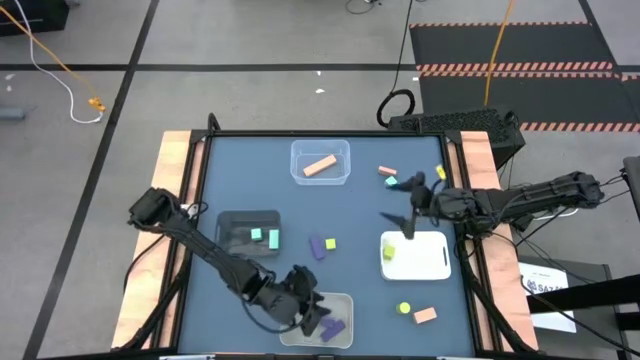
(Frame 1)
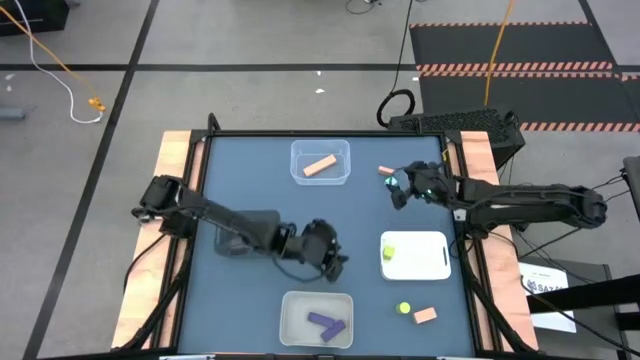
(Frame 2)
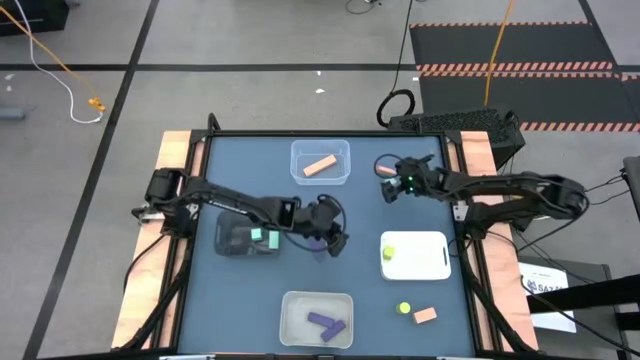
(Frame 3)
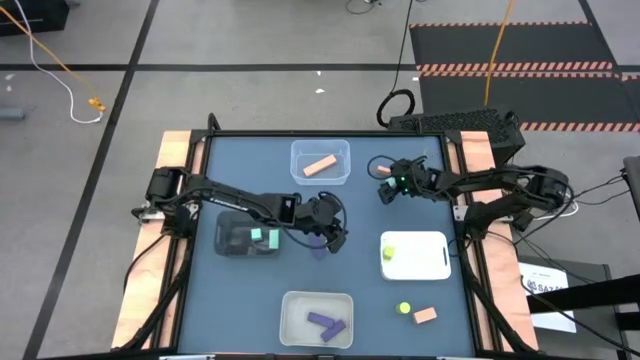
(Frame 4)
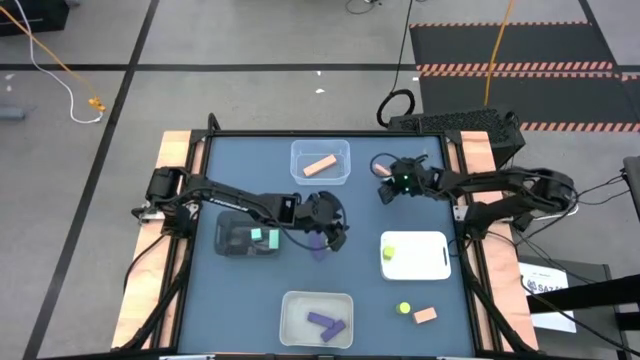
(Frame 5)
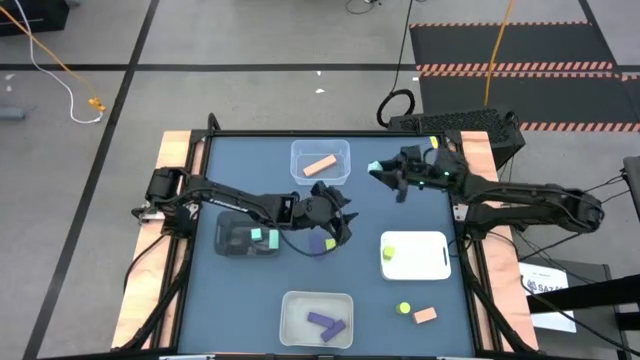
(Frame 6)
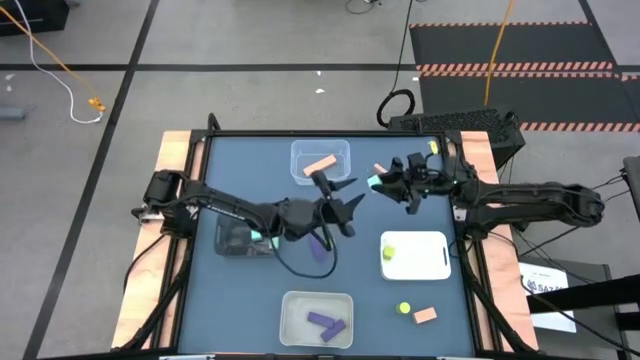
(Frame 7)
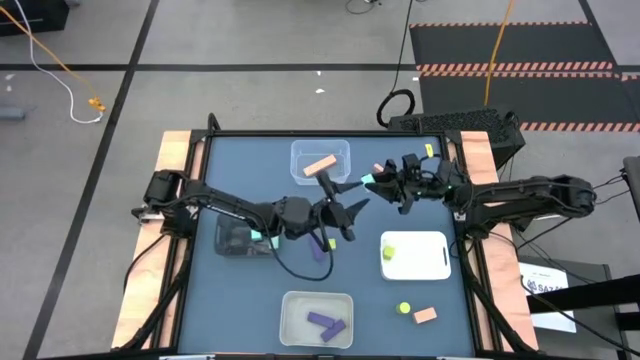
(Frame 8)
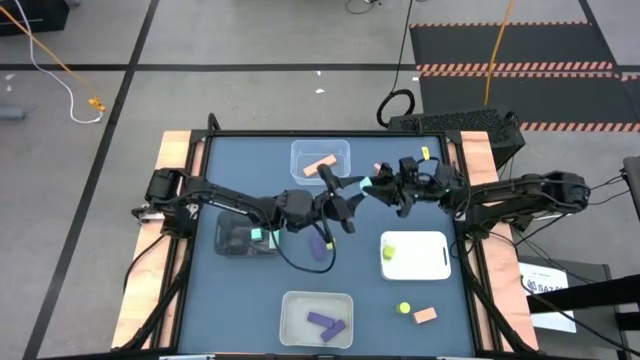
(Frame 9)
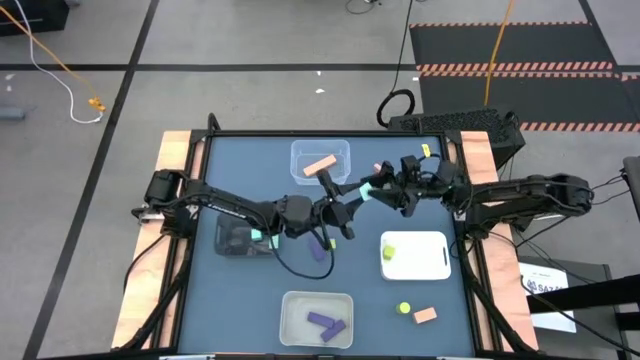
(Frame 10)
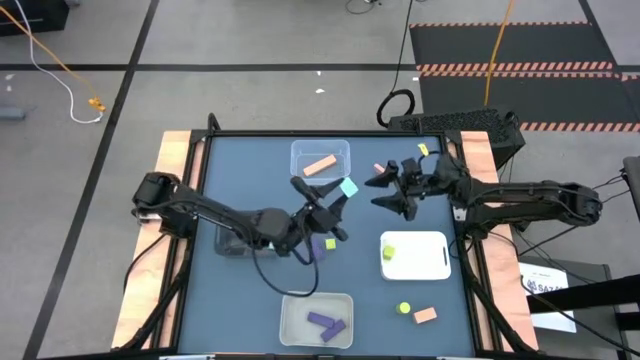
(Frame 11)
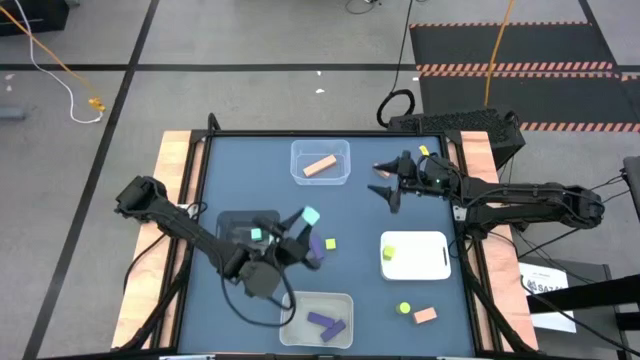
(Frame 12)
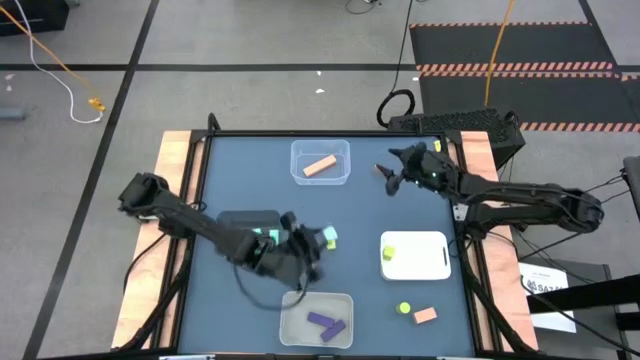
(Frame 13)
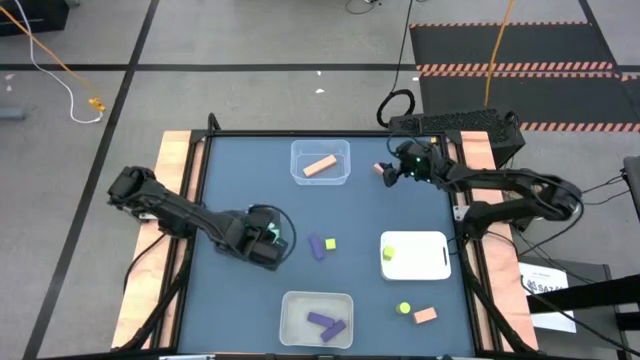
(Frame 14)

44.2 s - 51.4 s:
Task: Sort & place blocks by color
Put the blue block into the black bin

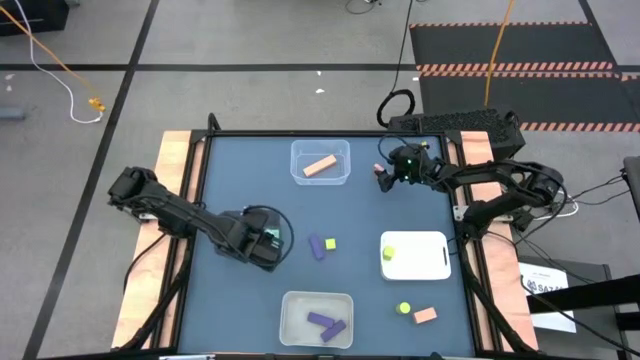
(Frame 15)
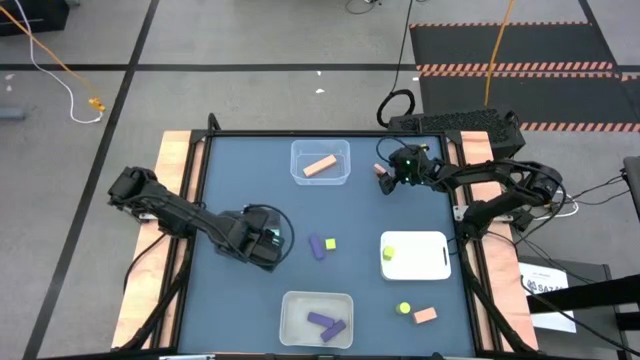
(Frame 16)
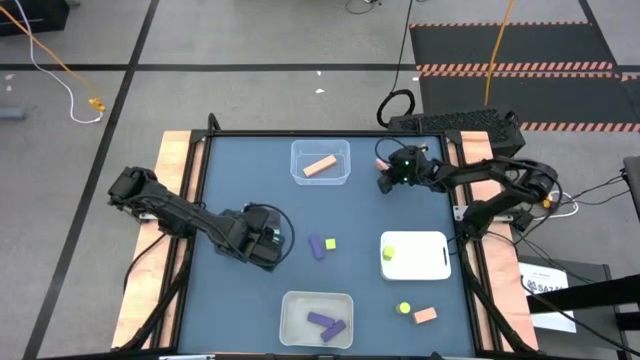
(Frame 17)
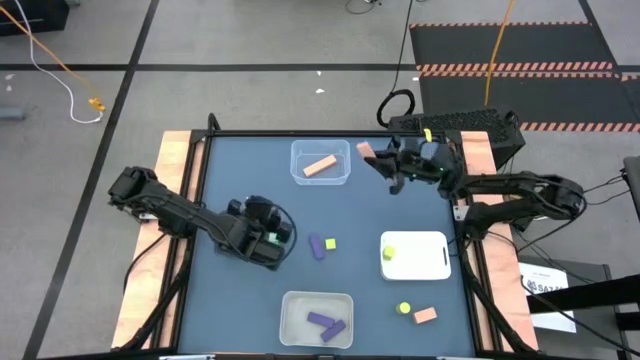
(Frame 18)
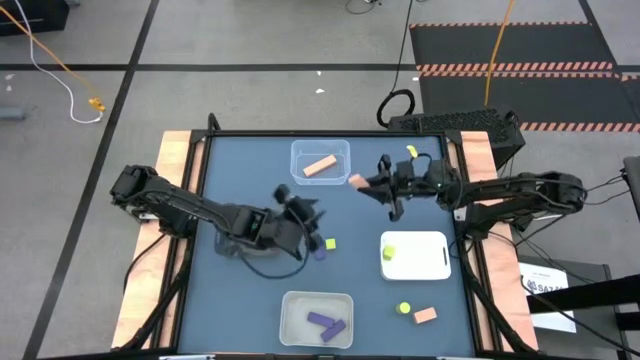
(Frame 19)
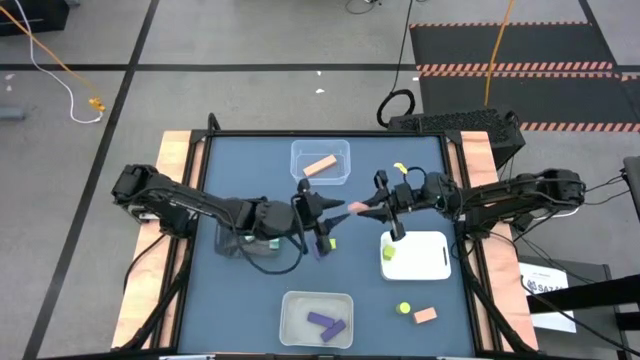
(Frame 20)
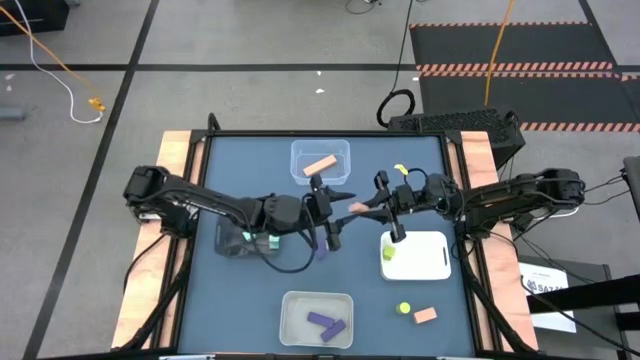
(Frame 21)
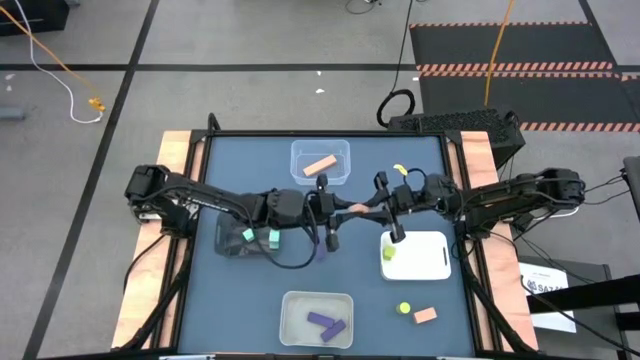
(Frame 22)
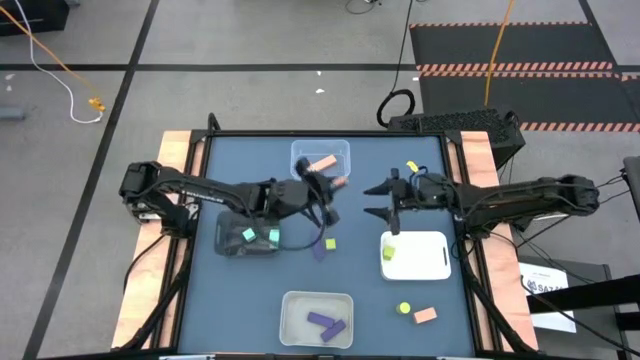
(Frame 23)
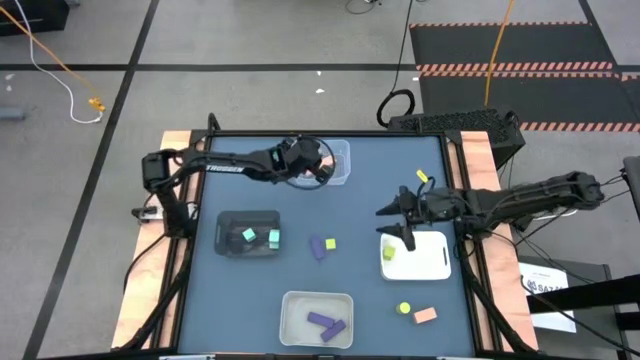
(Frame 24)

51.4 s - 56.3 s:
Put the top orange block into the transparent bin

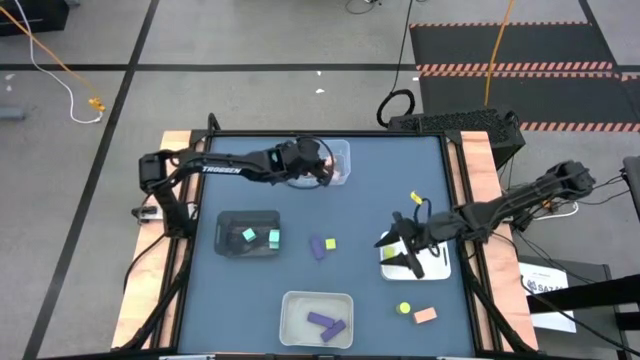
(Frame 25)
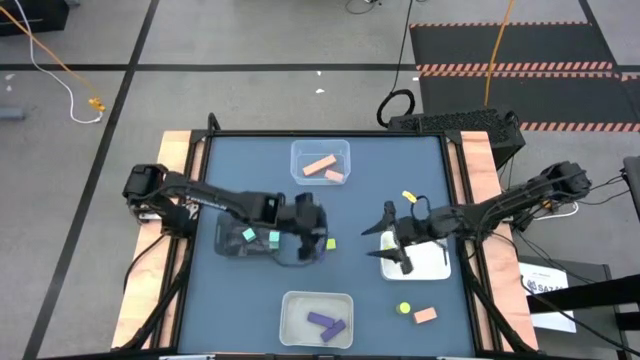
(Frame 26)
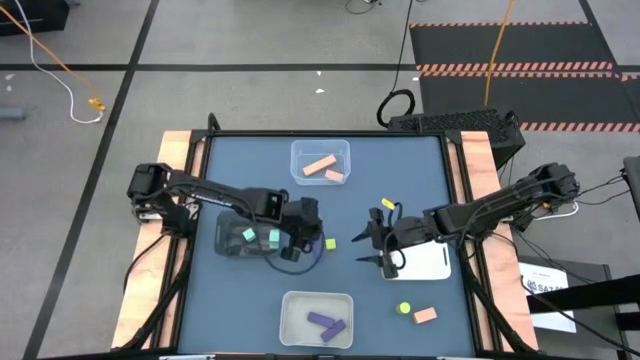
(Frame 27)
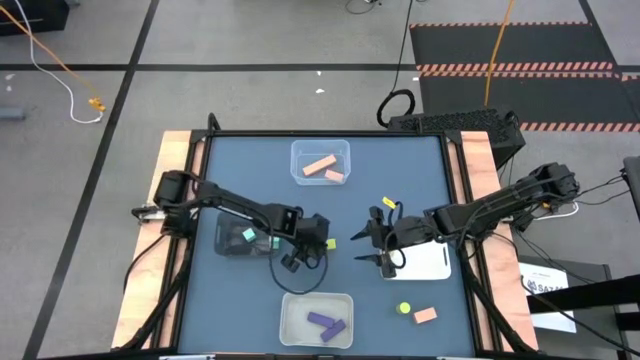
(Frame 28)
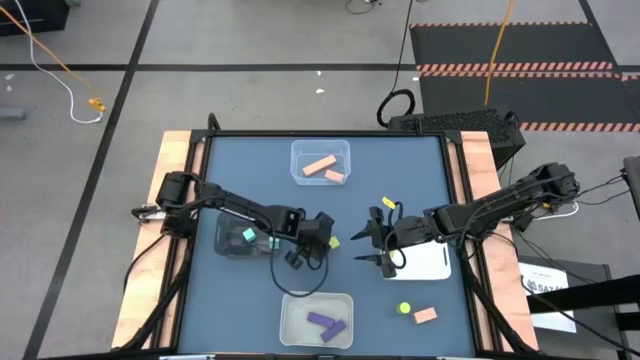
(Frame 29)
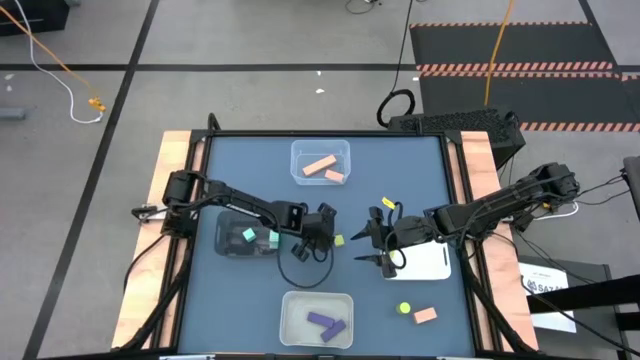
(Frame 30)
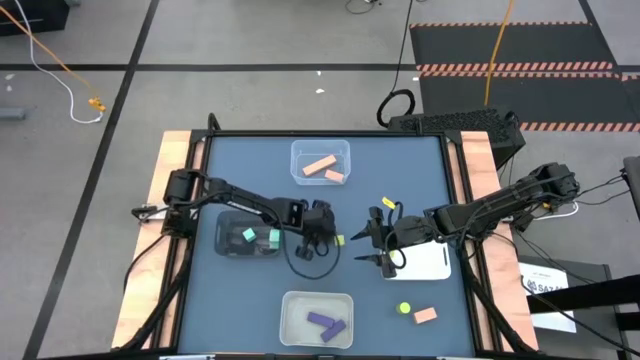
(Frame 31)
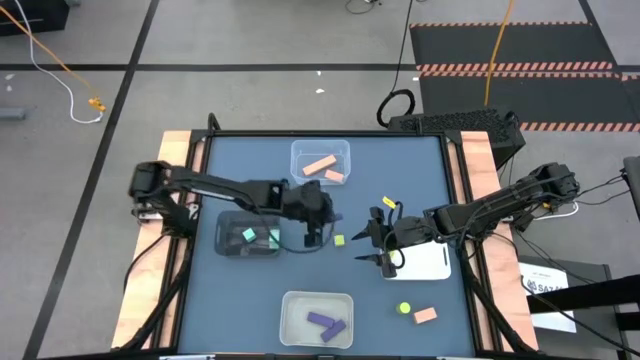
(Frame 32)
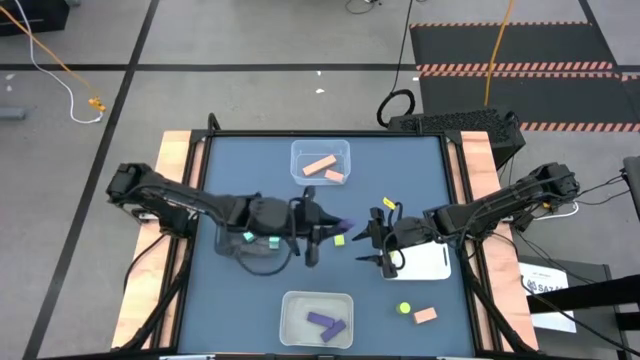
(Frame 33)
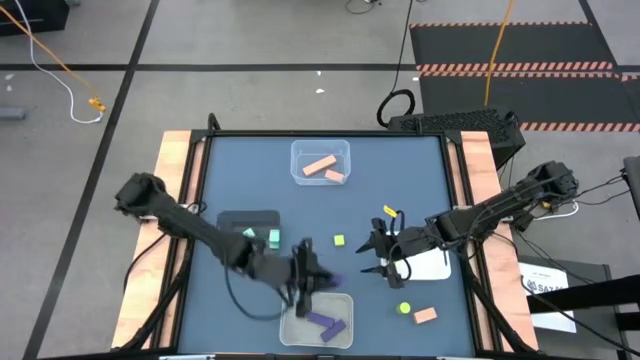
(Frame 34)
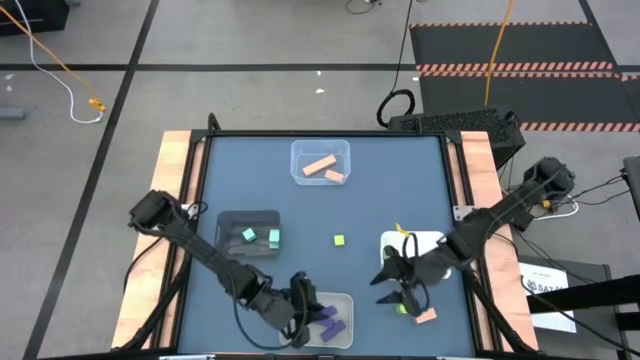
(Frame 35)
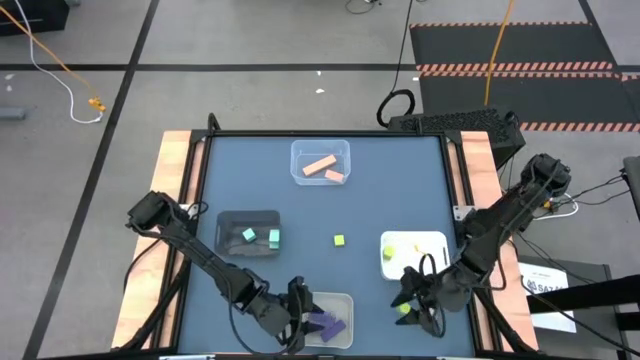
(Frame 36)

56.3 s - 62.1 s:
Put the purple block into the gray bin

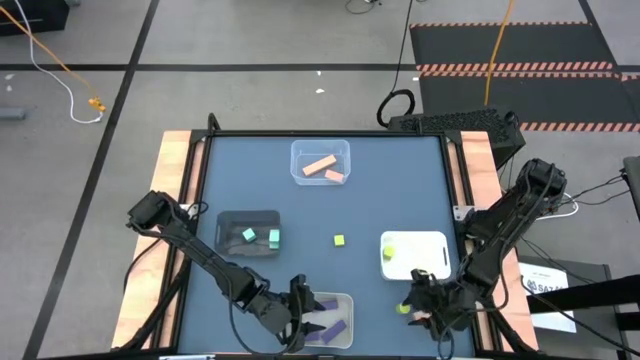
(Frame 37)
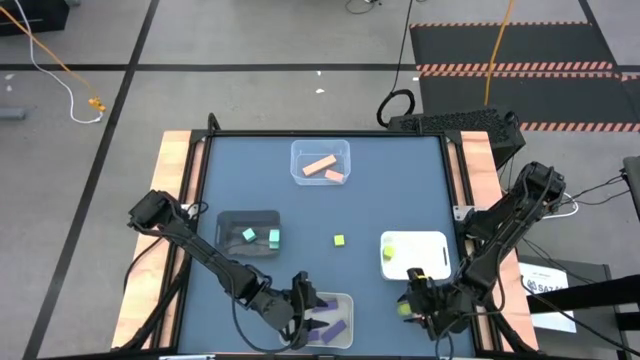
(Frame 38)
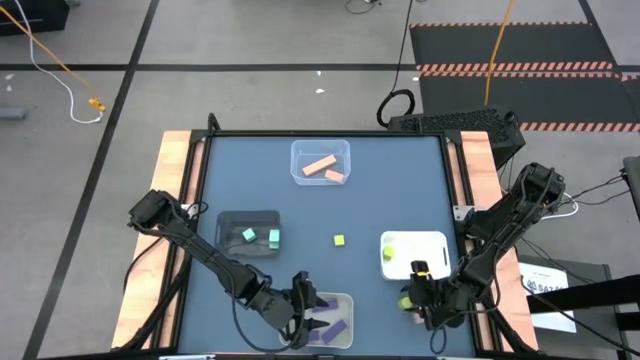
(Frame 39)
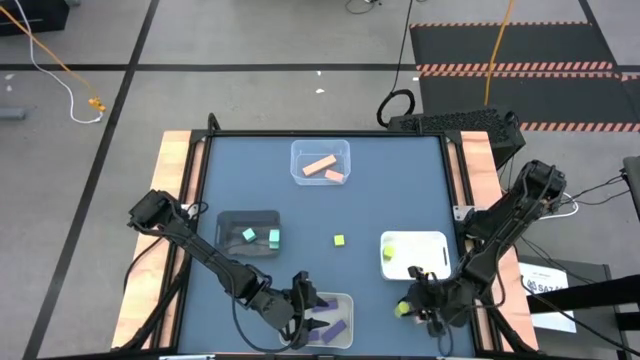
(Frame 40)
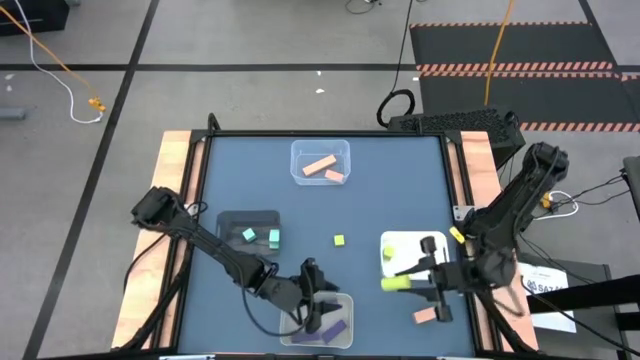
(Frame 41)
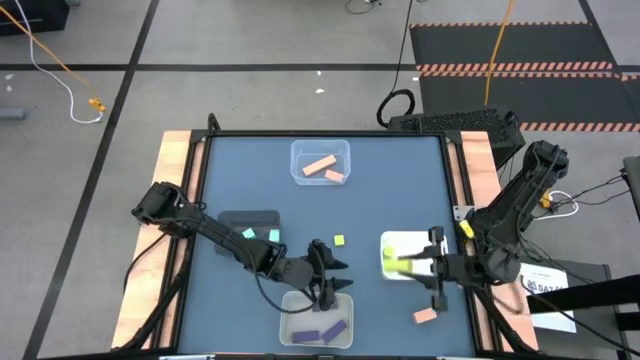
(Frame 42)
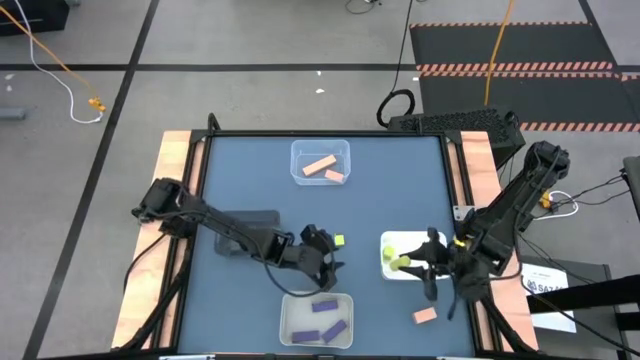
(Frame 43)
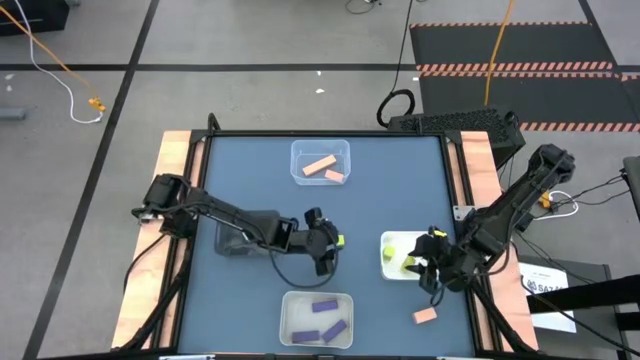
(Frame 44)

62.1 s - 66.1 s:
Put the bottom green block into the white bin
